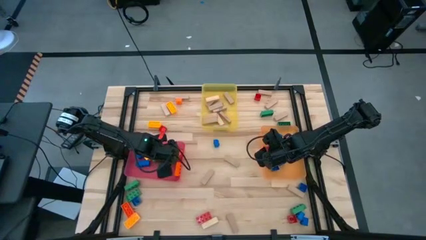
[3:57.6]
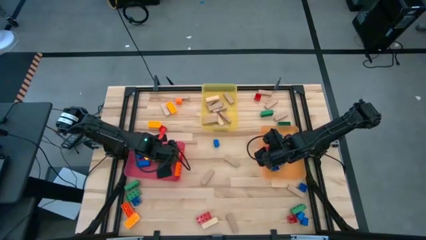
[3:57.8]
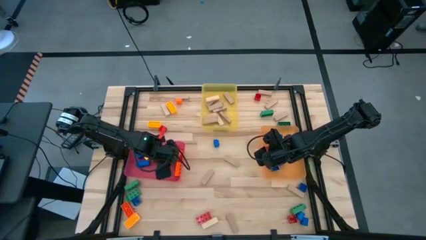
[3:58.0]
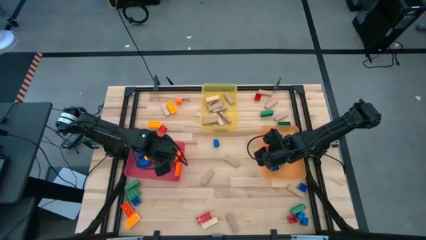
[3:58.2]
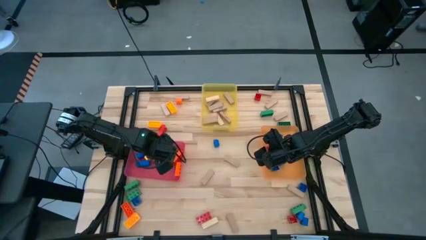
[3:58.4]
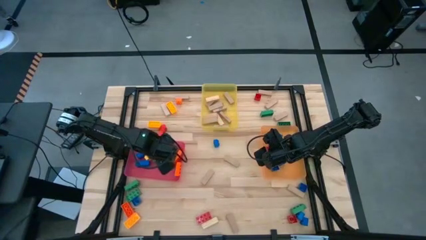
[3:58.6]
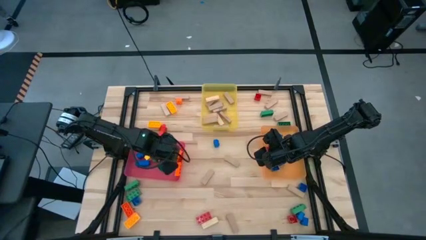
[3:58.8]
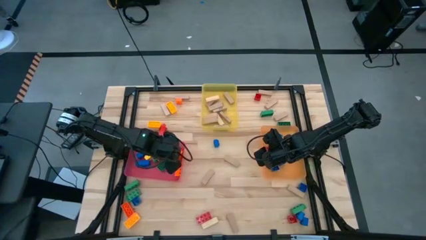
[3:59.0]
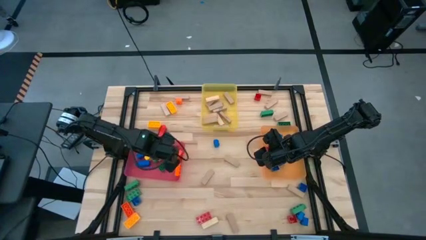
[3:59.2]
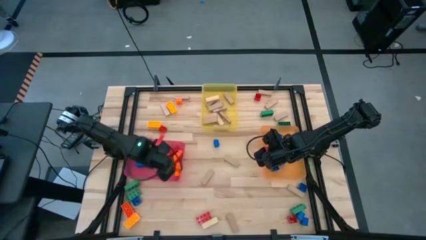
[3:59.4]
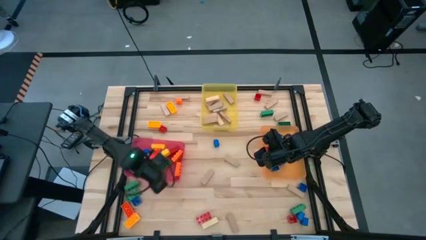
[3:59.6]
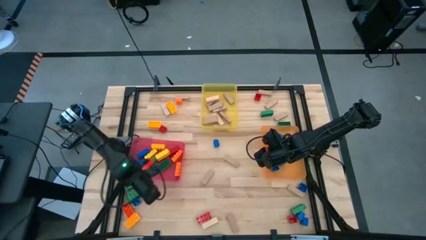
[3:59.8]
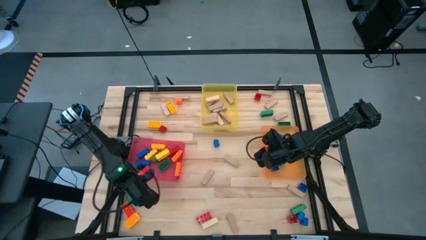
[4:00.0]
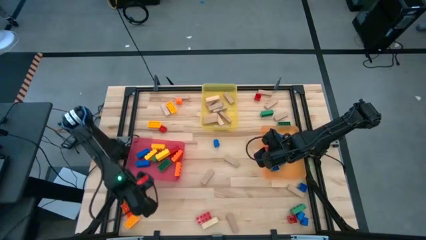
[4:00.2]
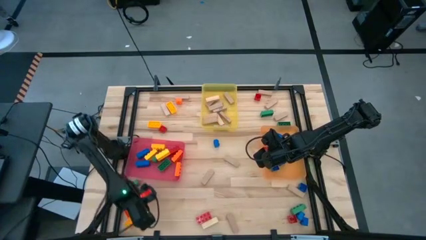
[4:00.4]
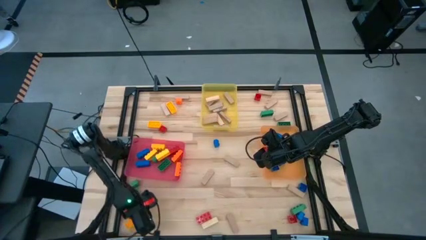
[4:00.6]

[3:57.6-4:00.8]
Task: Sort blocks by size
Put the 3 stud yellow game piece into the pink bin

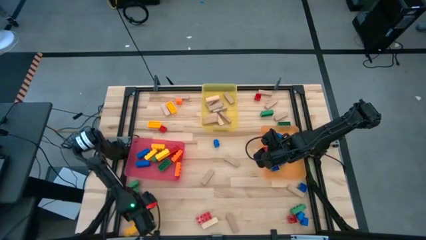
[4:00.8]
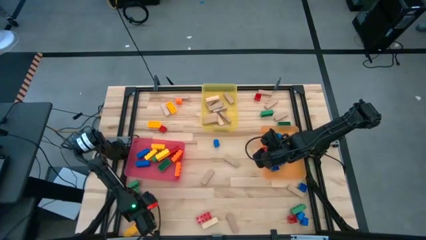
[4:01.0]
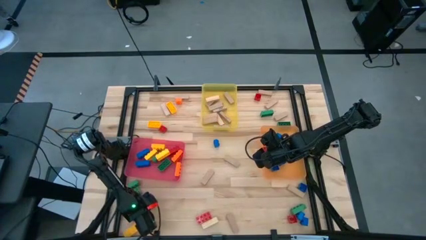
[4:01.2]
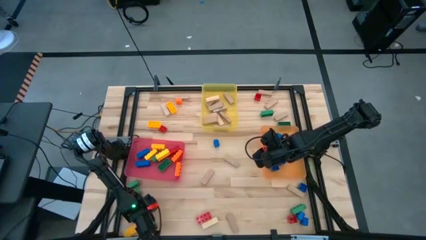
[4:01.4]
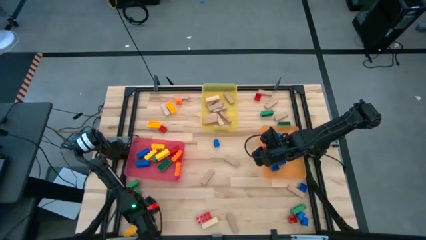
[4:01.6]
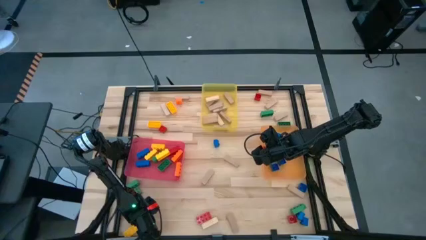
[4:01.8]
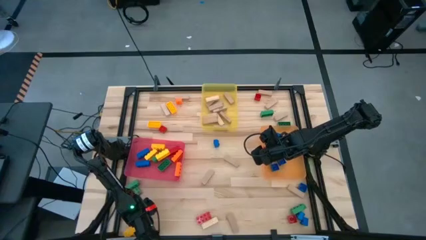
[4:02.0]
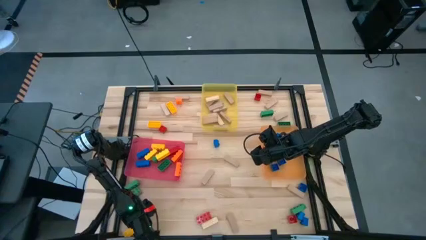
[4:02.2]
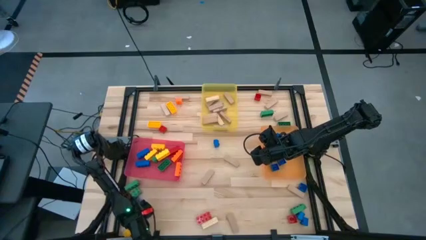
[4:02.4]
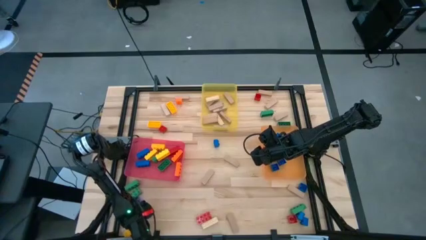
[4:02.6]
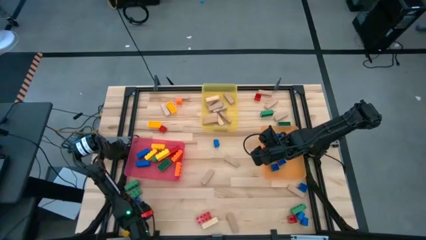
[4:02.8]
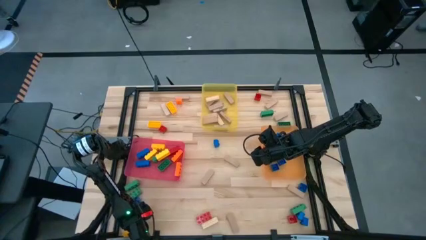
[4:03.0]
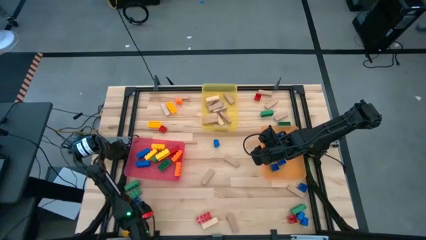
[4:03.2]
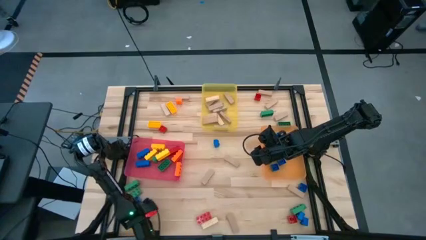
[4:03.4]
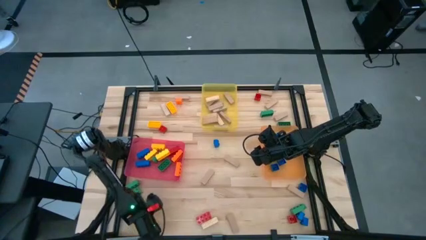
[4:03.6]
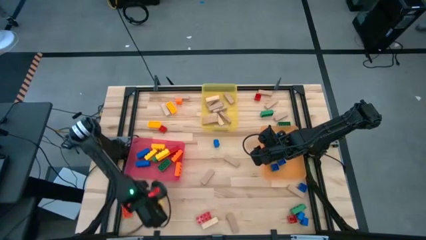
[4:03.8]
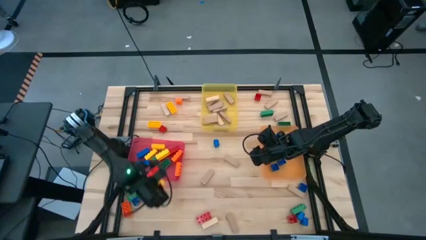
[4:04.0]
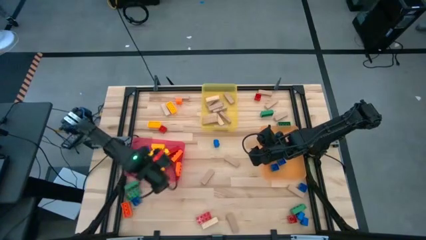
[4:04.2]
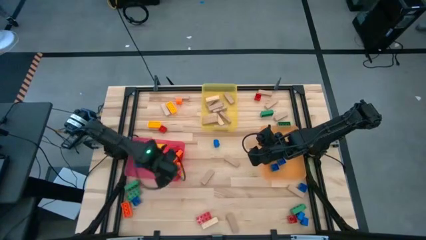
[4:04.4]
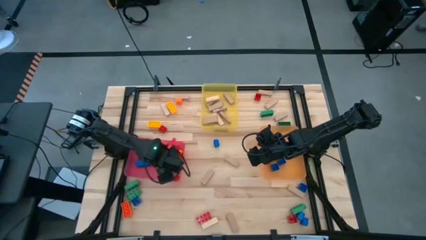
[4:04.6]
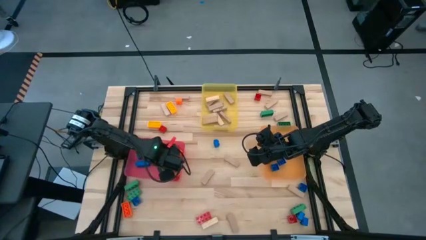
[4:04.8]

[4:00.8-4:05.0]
Put the 3 stud yellow game piece into the pink bin

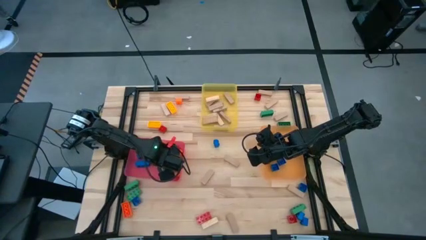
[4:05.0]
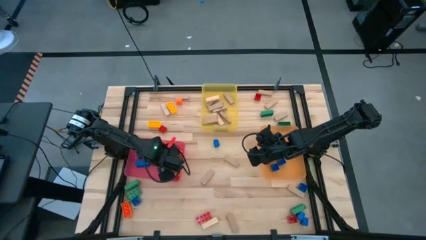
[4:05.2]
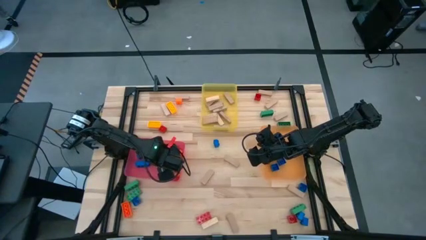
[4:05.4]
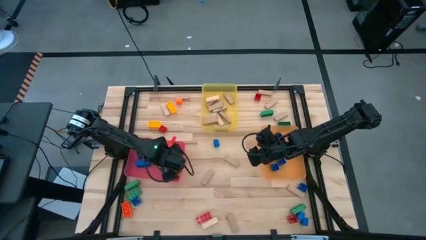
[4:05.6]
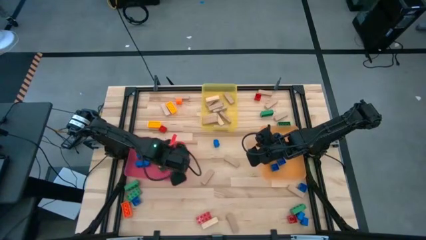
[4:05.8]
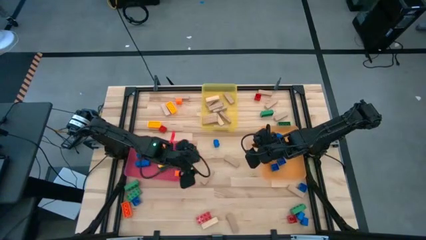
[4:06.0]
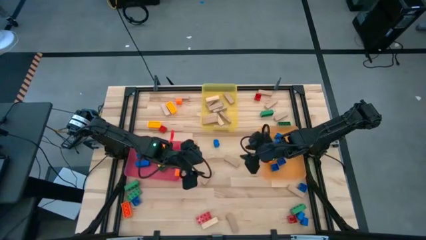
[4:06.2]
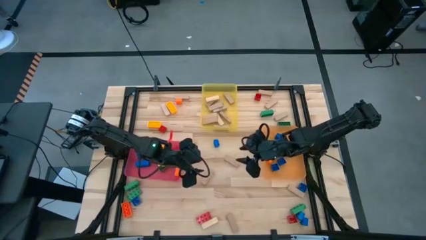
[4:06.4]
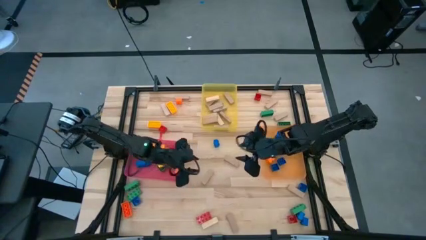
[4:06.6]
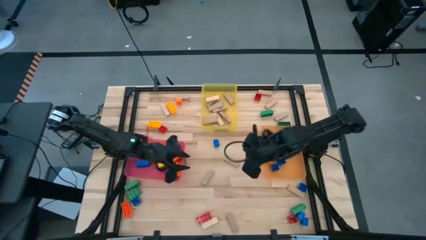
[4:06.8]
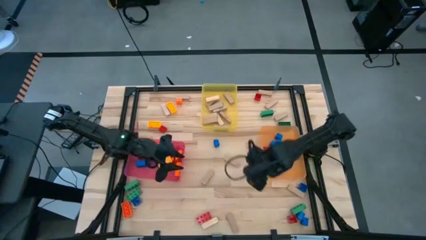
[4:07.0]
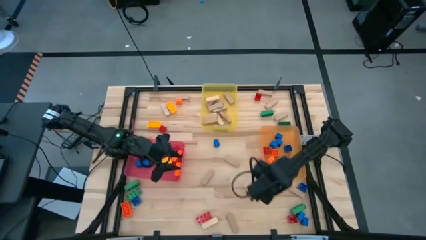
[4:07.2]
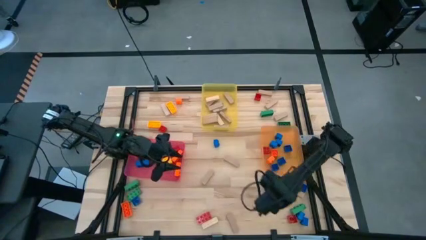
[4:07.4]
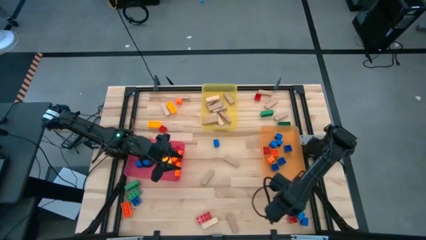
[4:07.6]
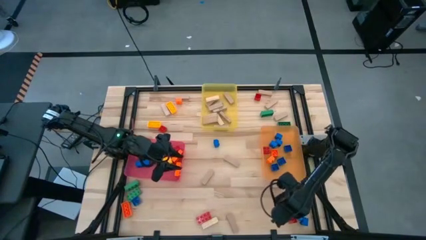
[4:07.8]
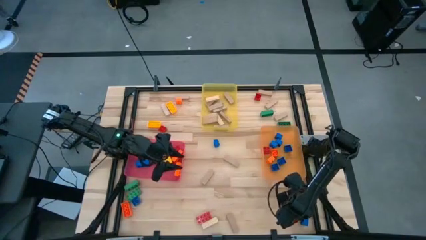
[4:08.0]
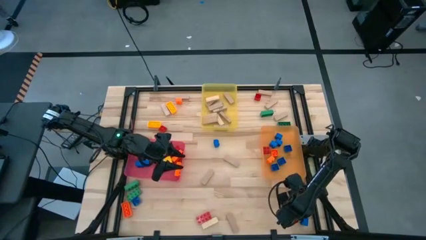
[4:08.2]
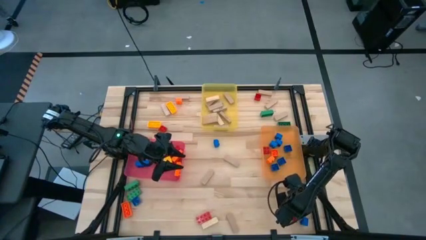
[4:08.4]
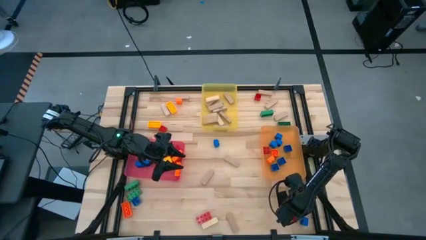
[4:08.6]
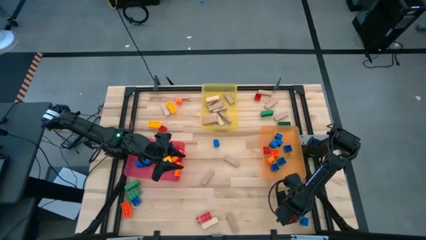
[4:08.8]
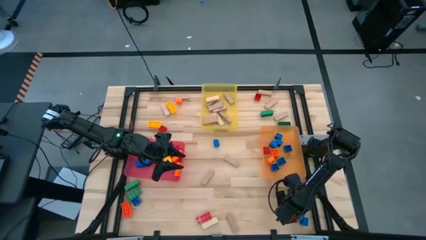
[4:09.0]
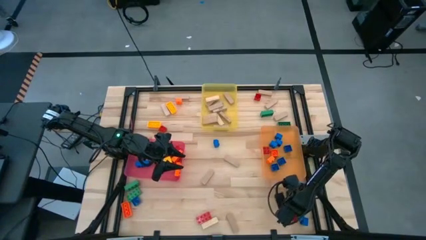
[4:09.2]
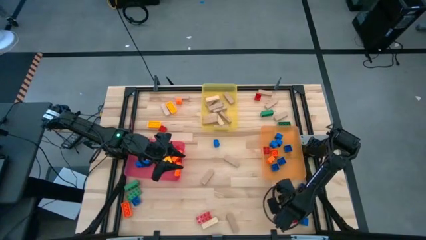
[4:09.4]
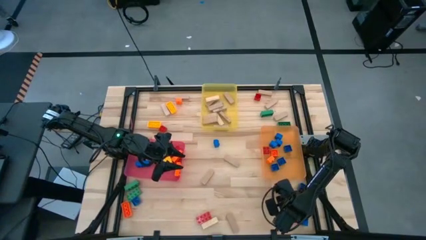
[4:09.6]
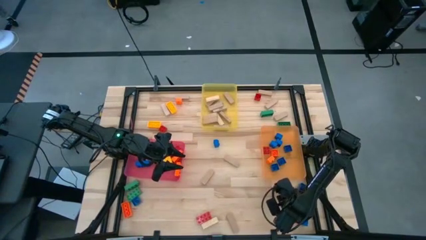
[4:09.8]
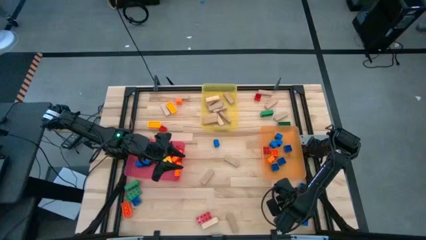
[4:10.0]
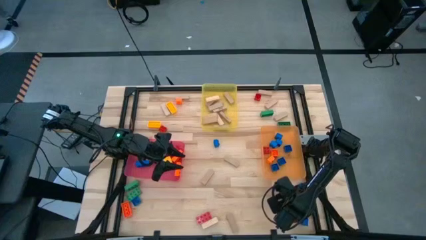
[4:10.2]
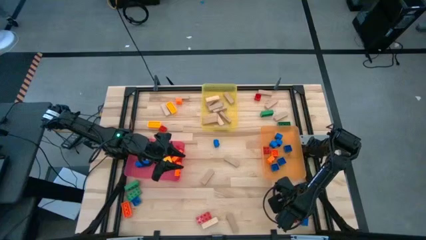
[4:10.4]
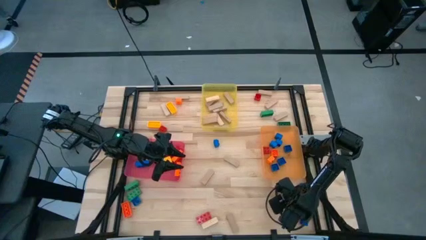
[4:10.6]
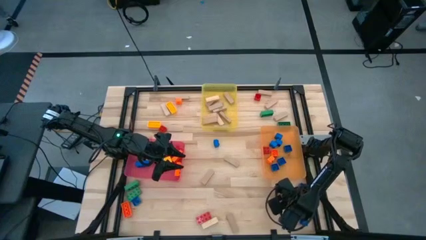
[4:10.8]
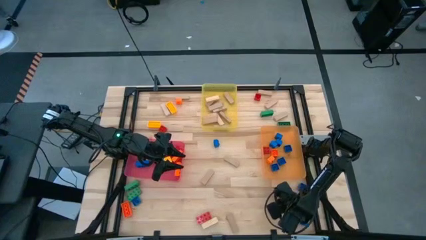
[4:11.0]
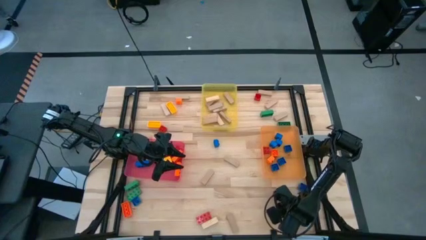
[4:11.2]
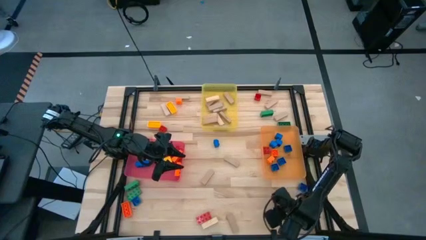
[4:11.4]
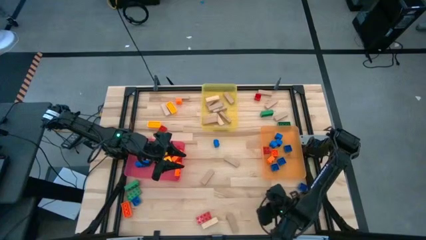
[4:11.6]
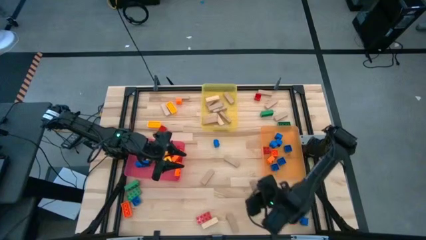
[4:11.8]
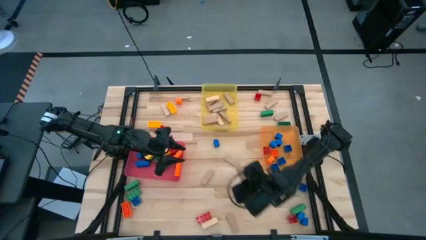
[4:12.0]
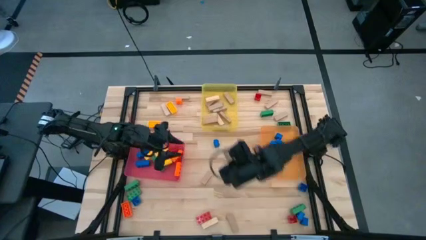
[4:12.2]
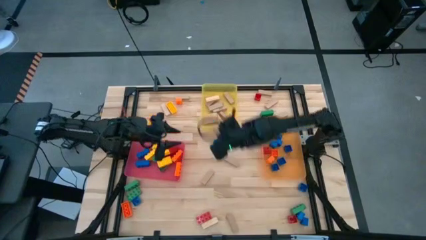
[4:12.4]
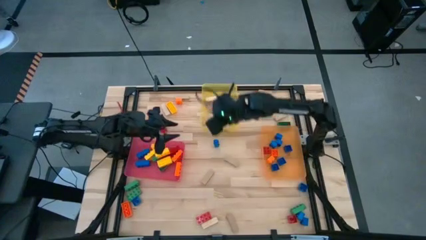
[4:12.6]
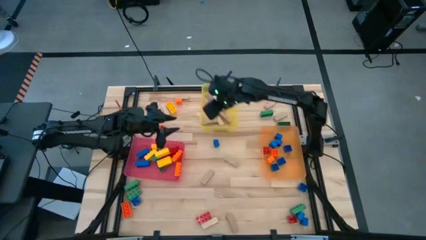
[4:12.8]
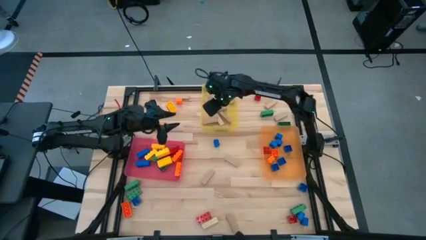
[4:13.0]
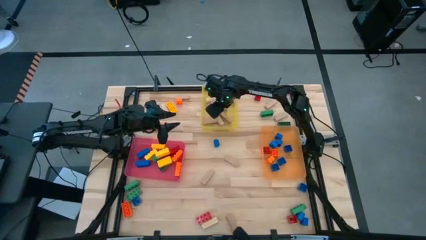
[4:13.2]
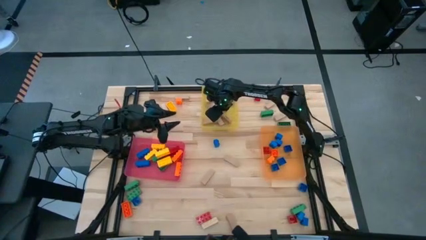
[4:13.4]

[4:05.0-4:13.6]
Put the wooden block into the yellow bin
